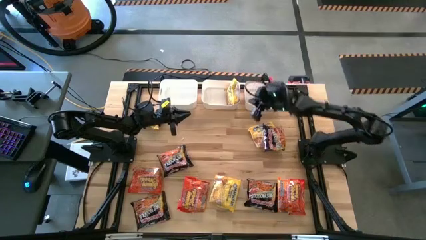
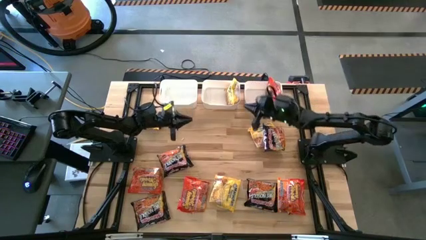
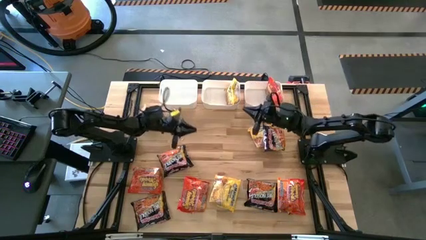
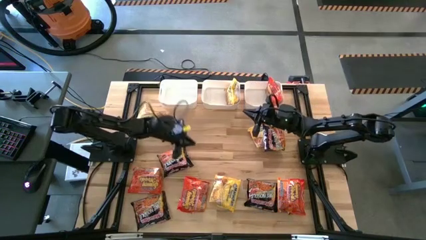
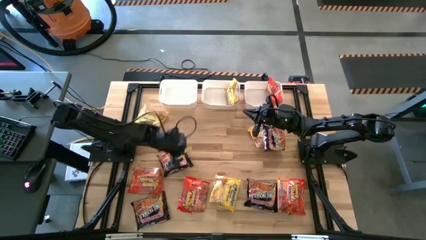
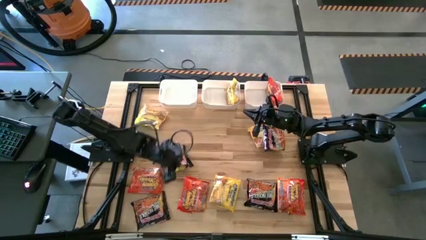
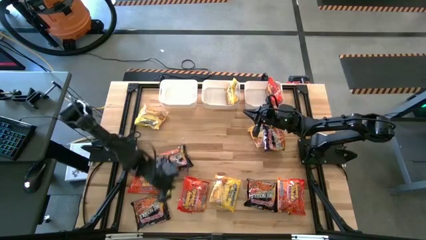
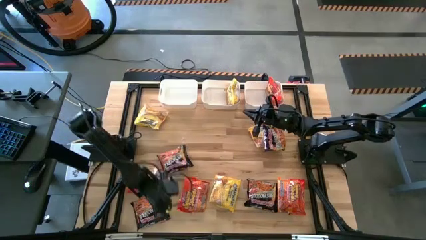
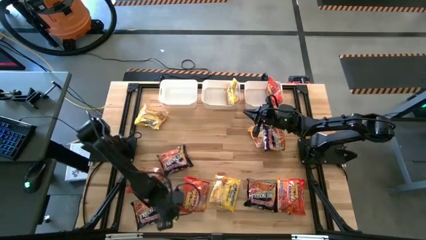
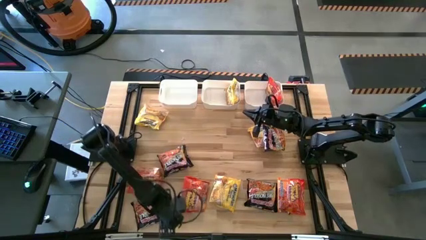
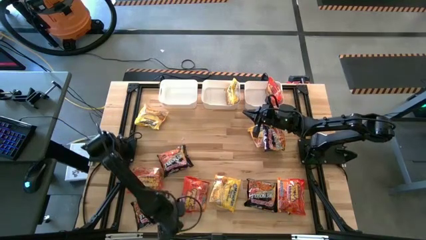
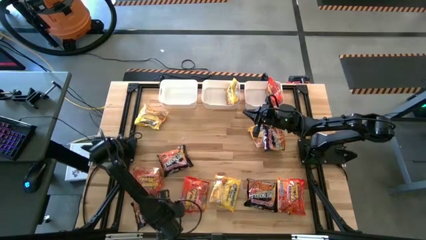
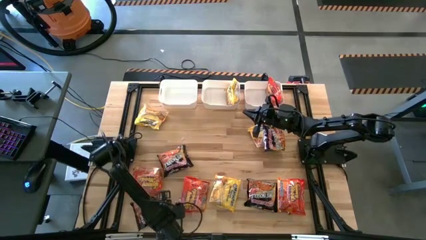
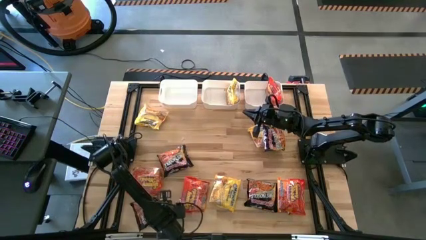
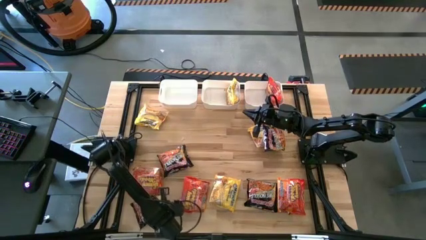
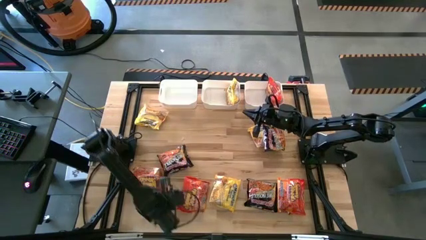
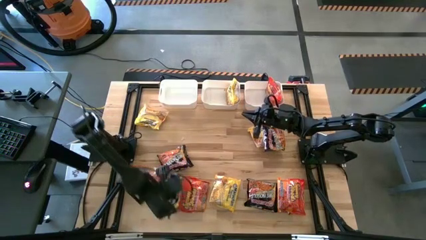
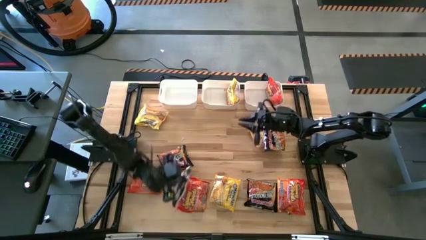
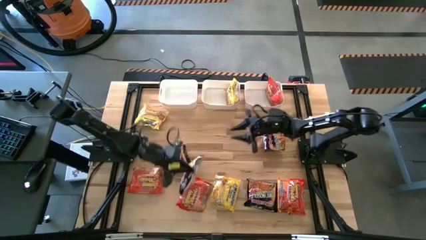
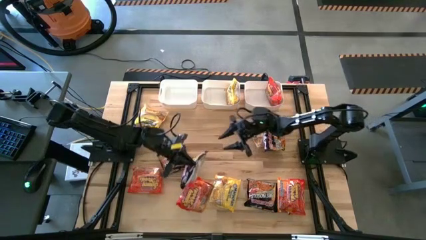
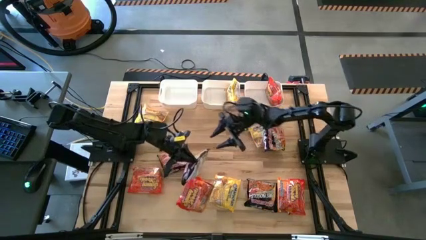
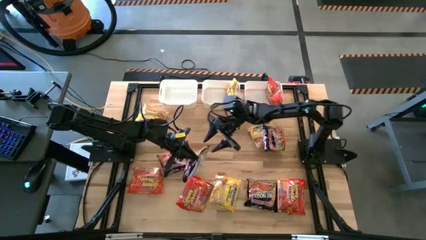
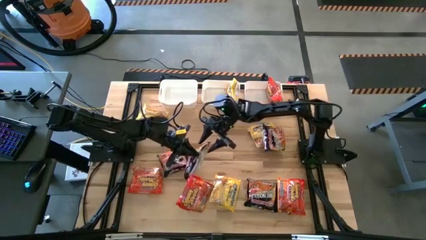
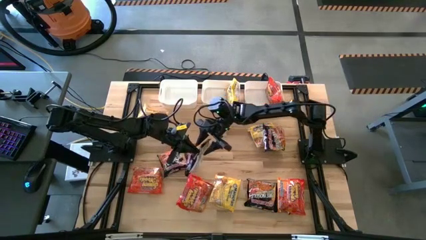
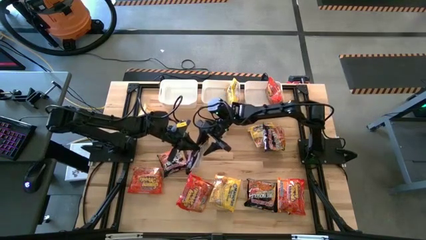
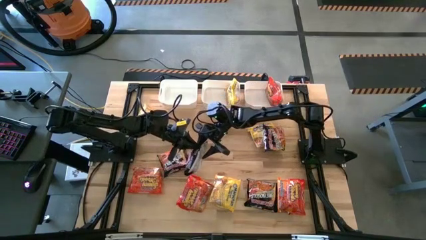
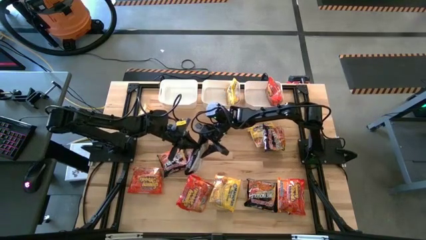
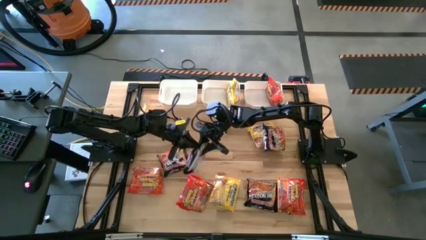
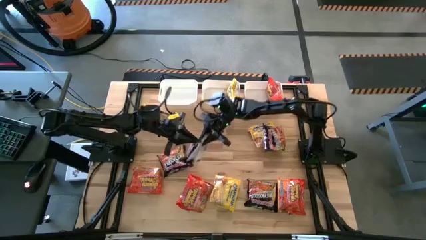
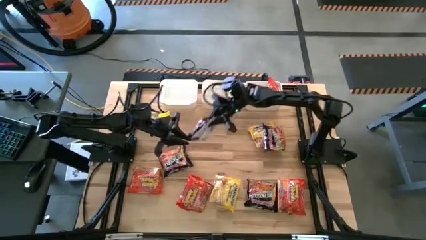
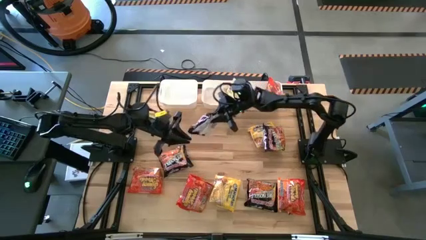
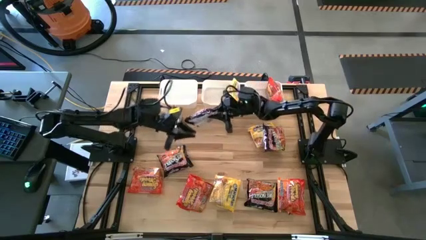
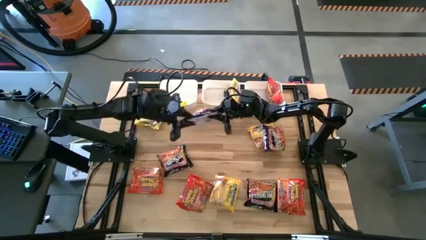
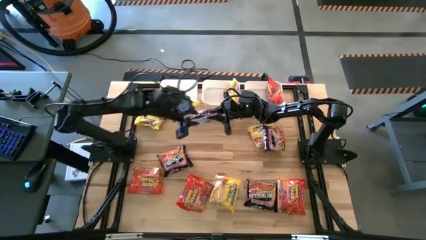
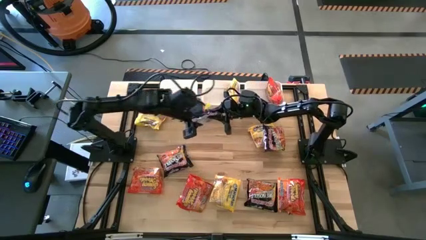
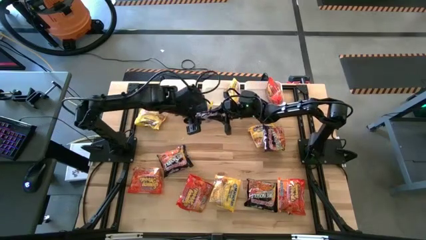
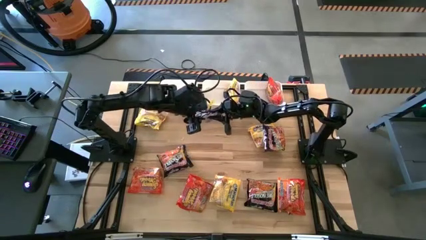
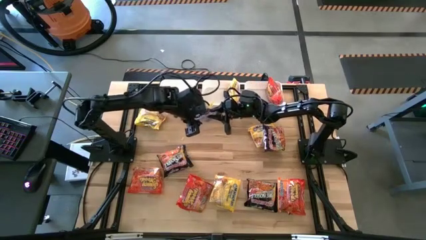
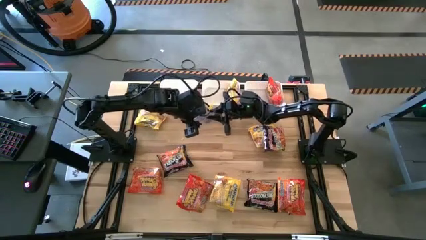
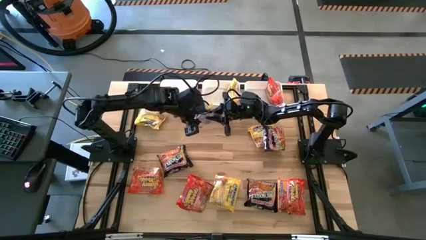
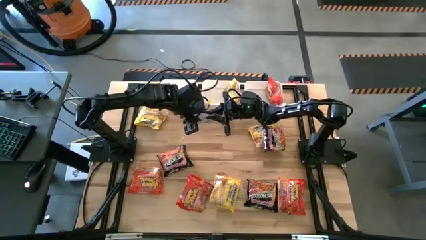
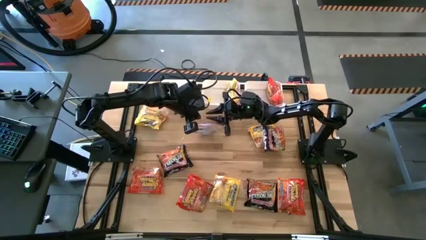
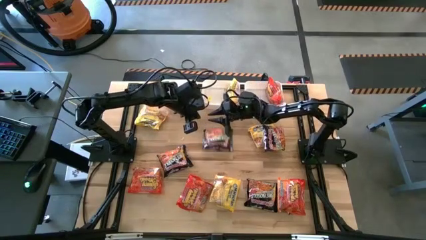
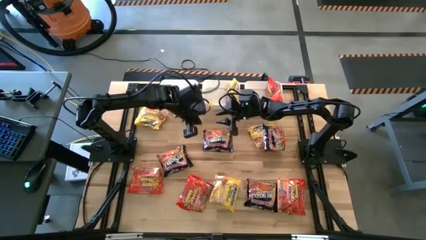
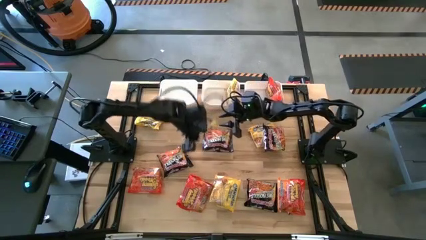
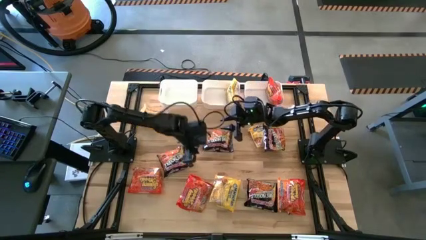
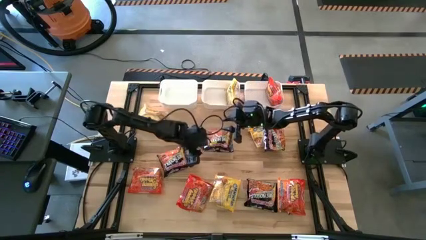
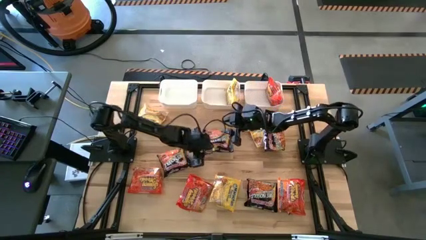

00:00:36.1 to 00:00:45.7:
Task: Sort Maruchan noodles
Put the black noodle into the left white bin

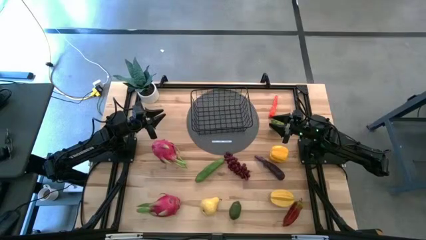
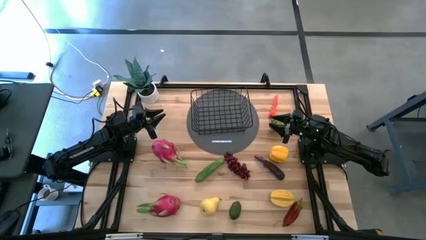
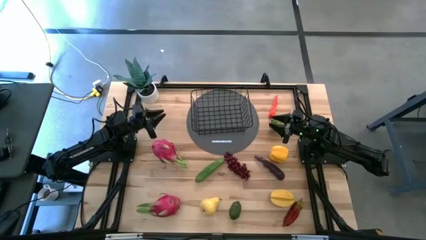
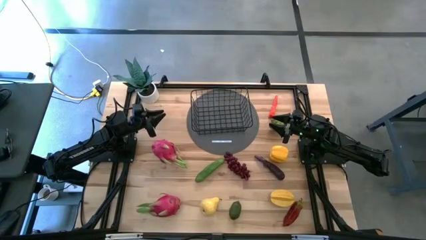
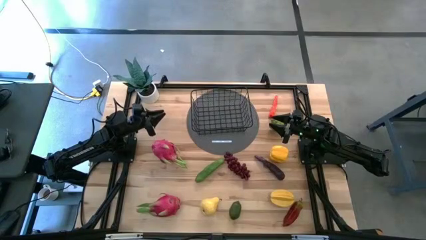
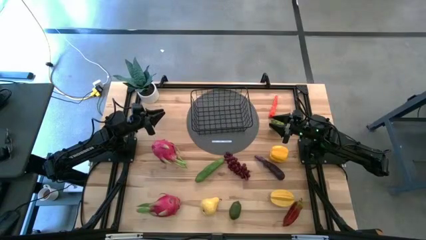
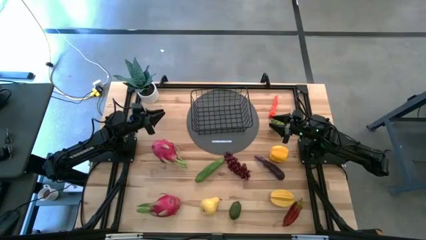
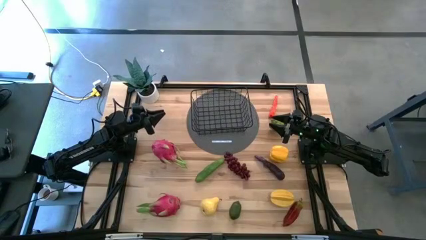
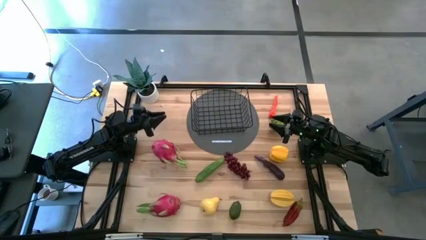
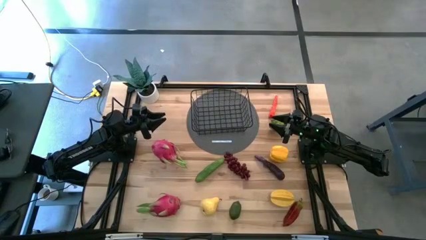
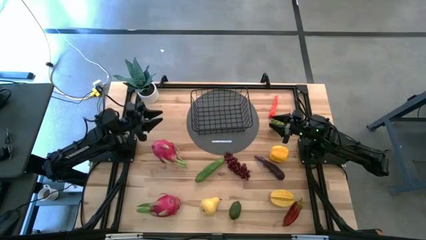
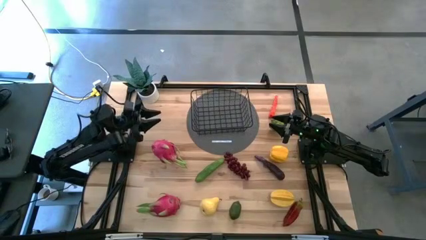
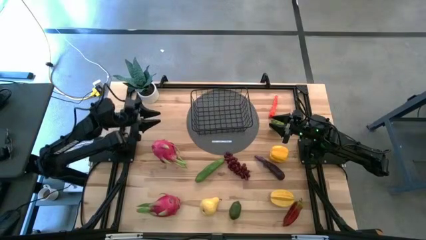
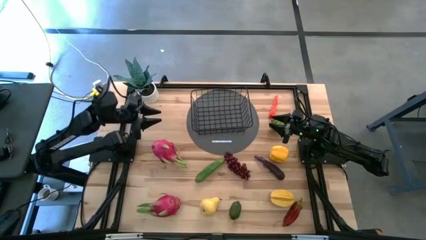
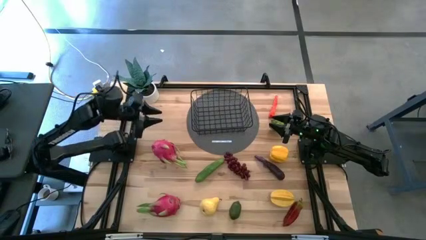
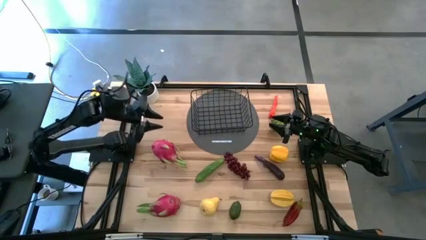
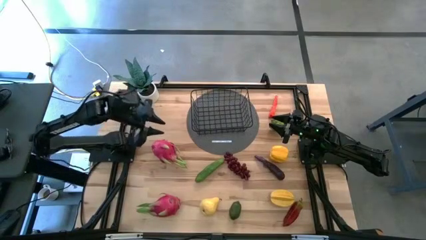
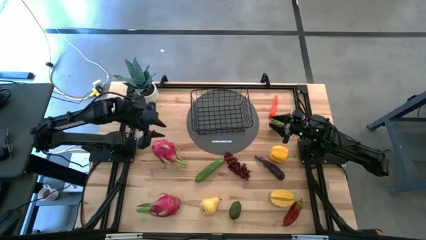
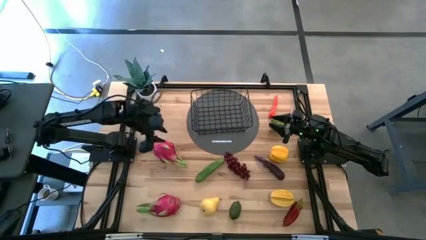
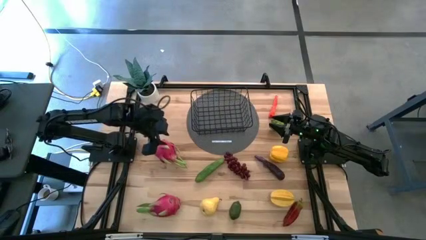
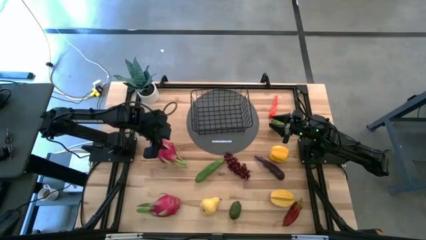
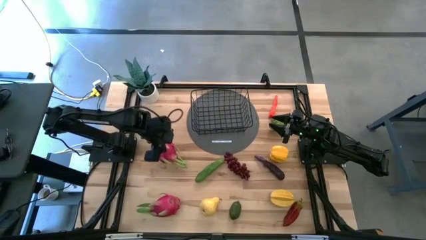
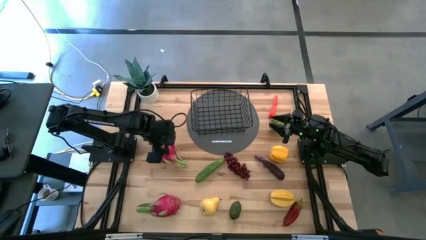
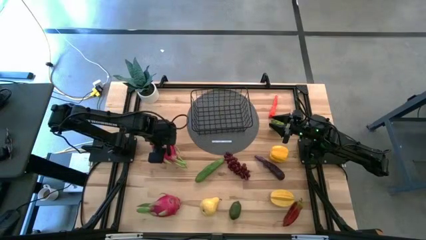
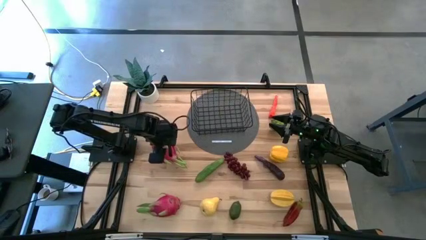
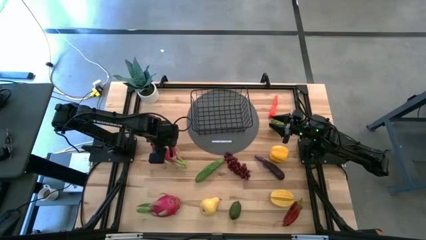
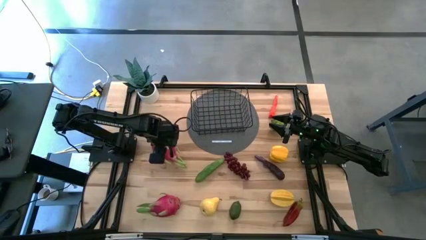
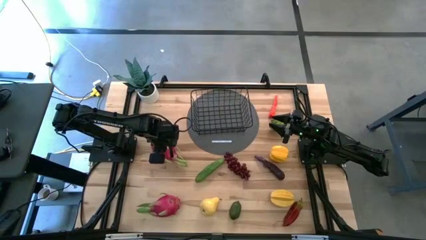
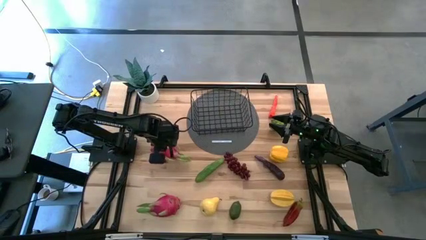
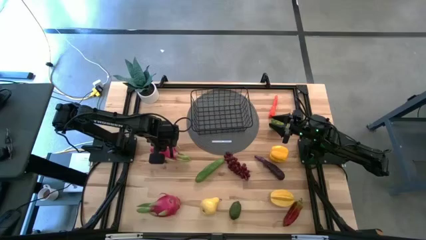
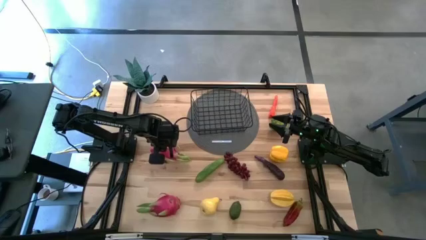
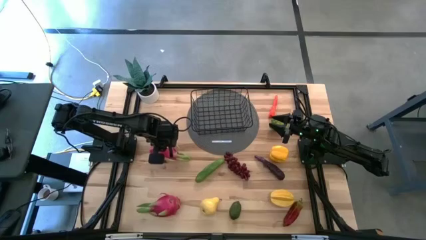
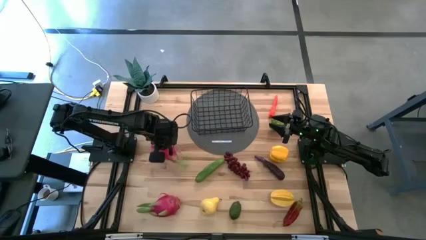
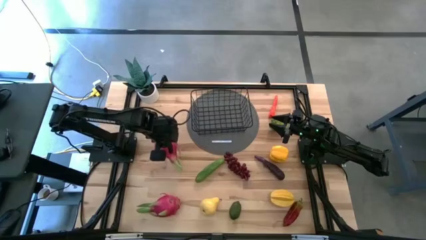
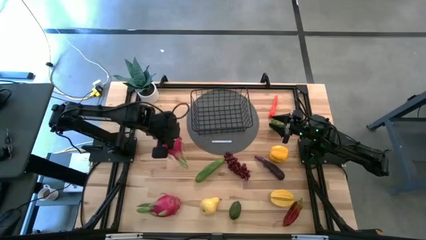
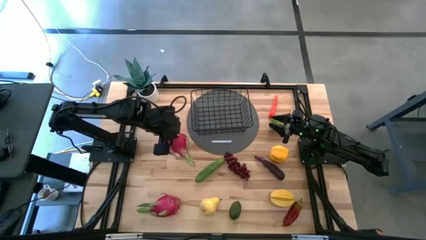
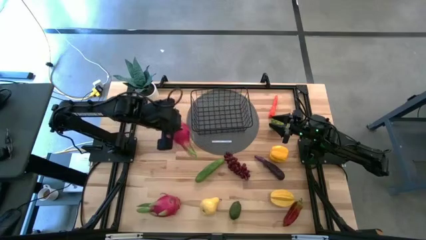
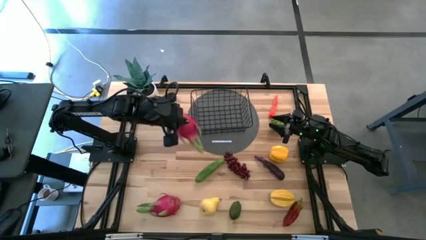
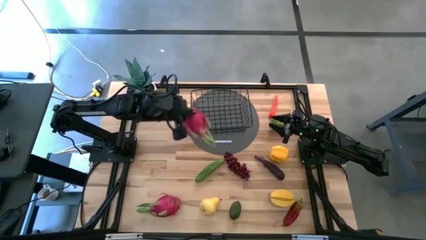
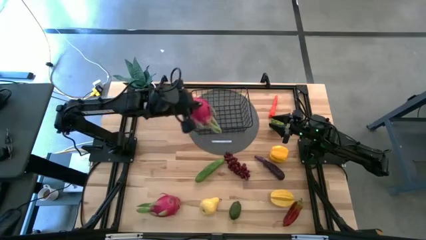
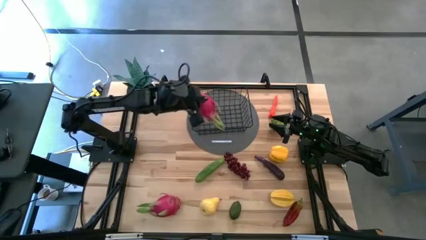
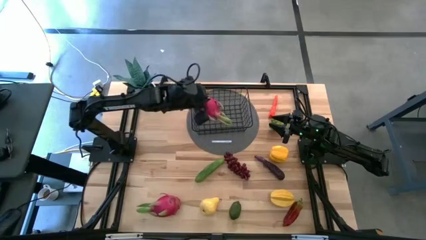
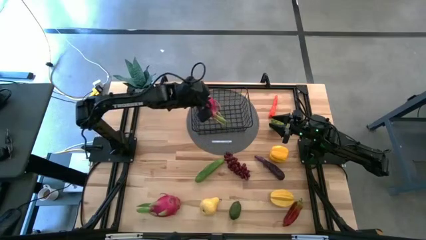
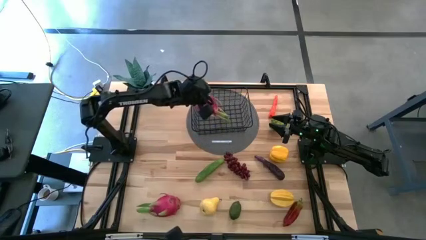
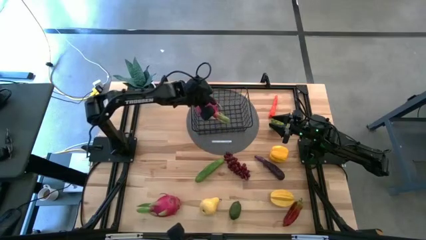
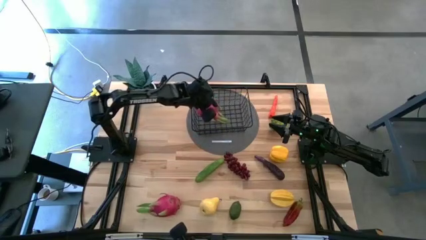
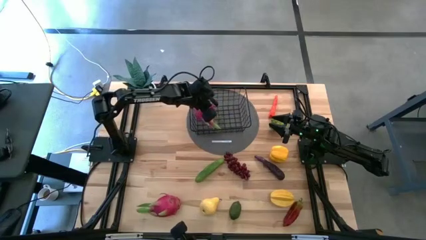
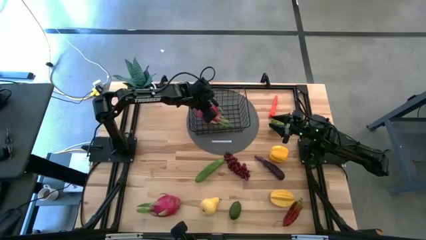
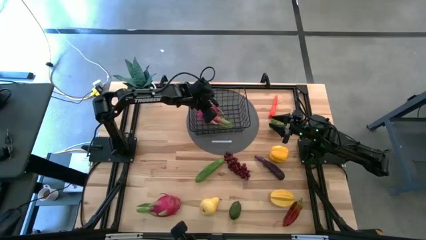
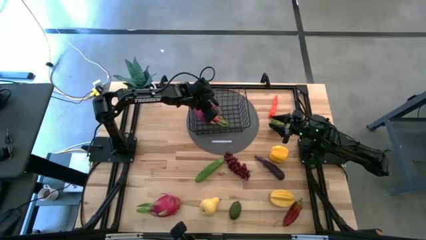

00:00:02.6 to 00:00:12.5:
Task: Build produce basket
Put the top dragon fruit into the wire basket
